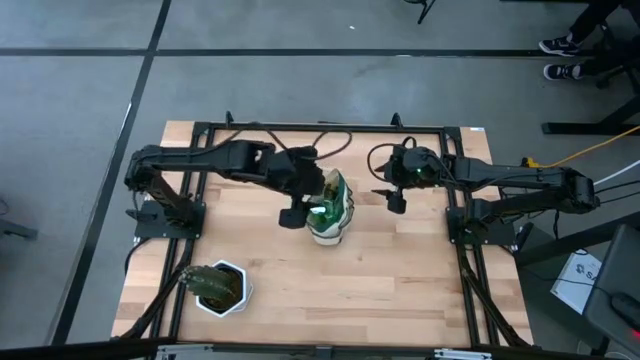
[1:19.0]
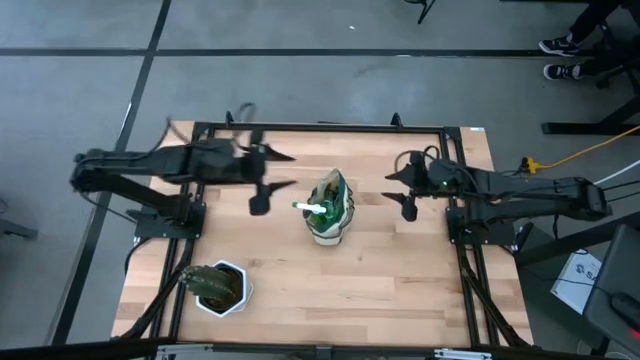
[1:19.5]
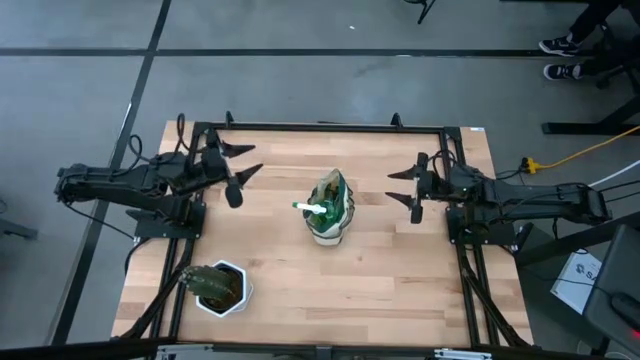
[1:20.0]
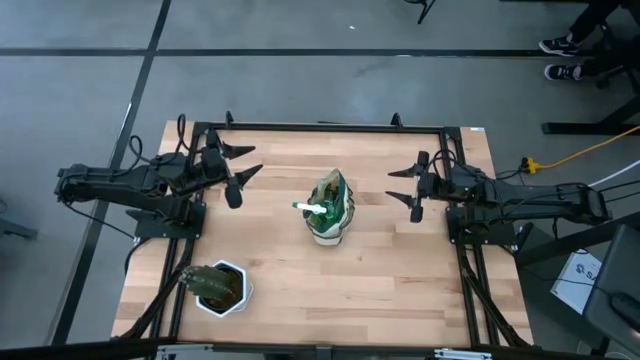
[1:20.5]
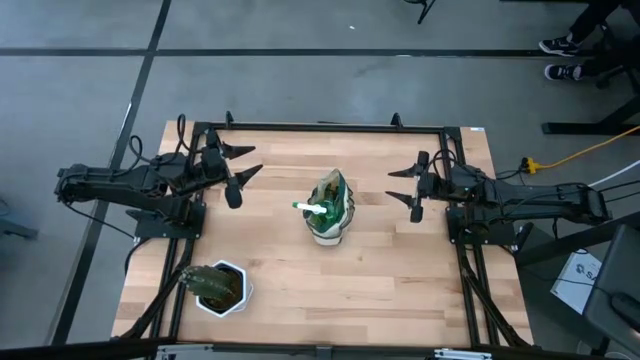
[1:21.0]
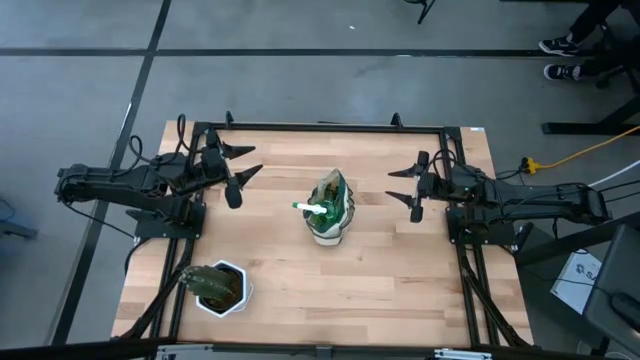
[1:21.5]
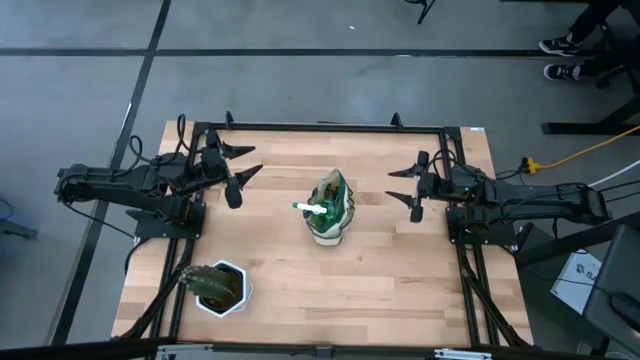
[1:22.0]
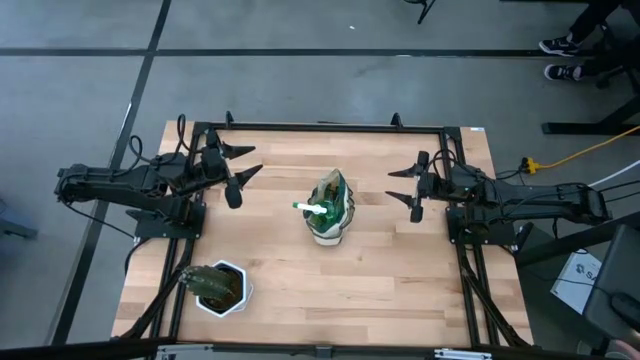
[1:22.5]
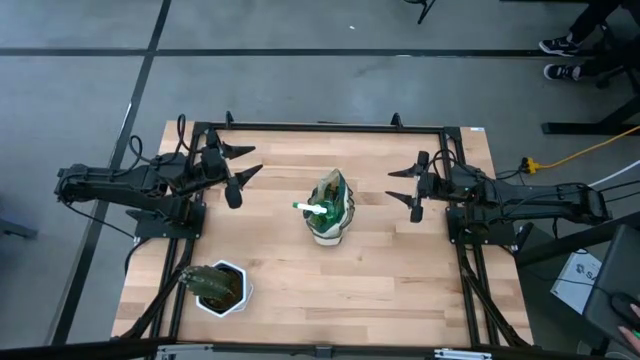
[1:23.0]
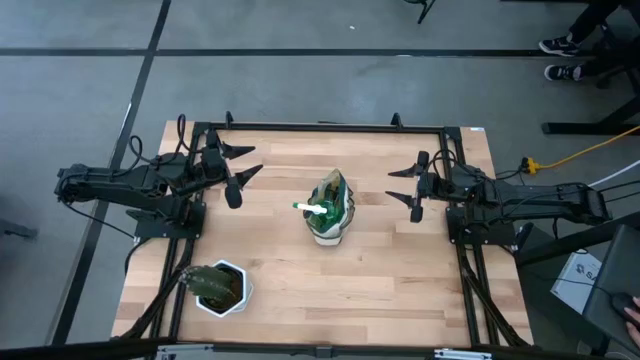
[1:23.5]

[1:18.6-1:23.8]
Task: Pick & Place Garden tools in Gardening bag
Return to Home Position

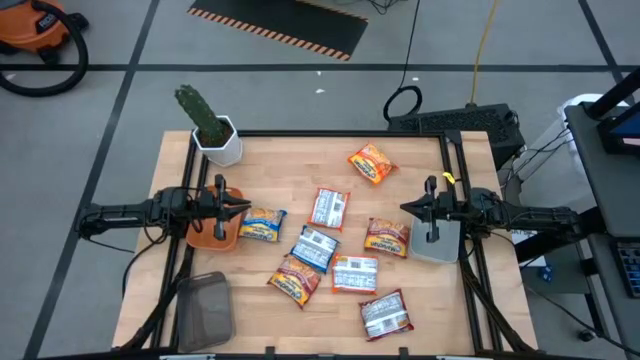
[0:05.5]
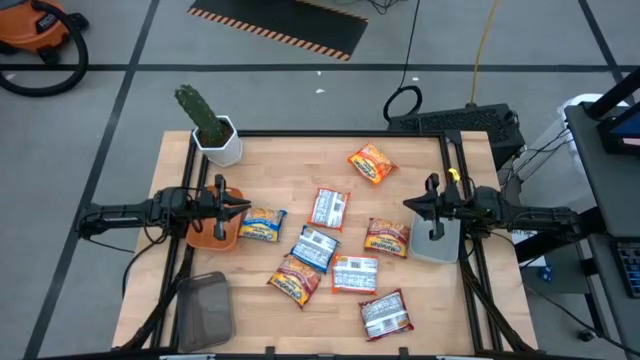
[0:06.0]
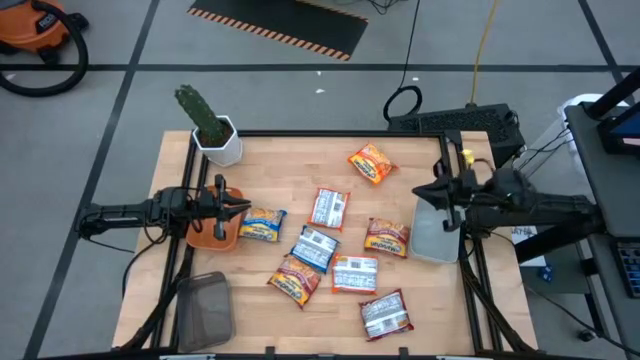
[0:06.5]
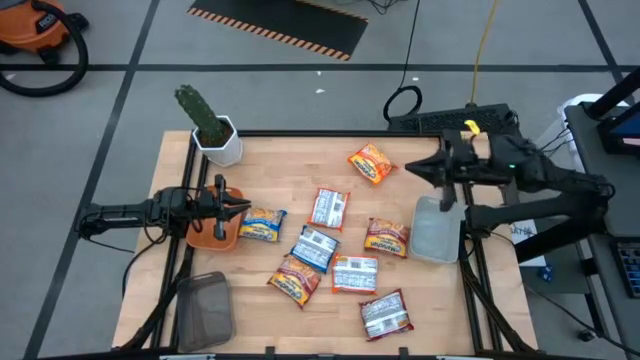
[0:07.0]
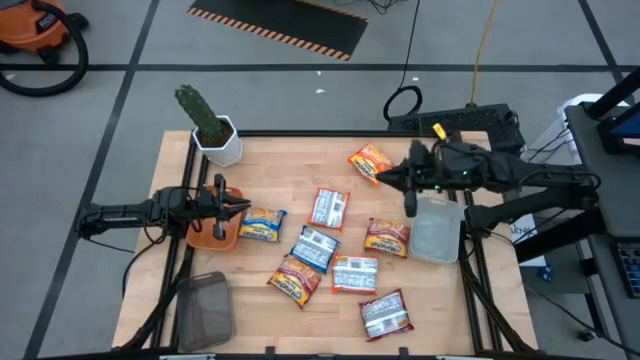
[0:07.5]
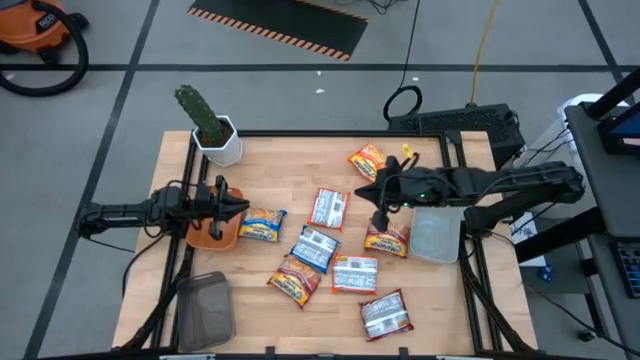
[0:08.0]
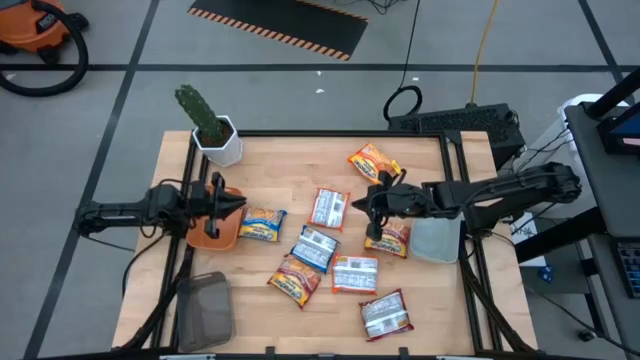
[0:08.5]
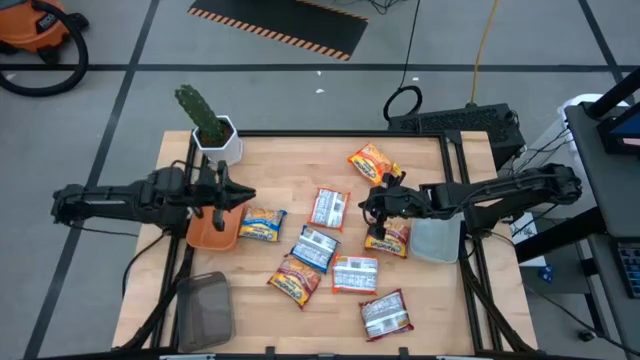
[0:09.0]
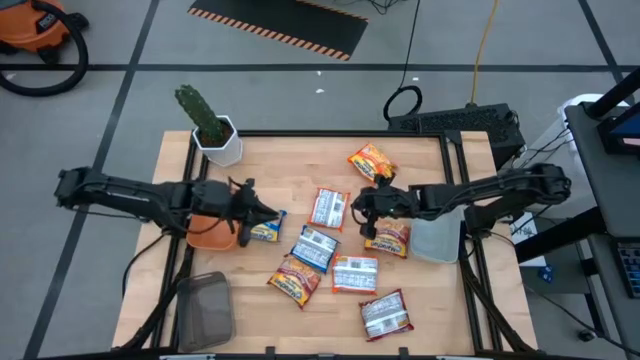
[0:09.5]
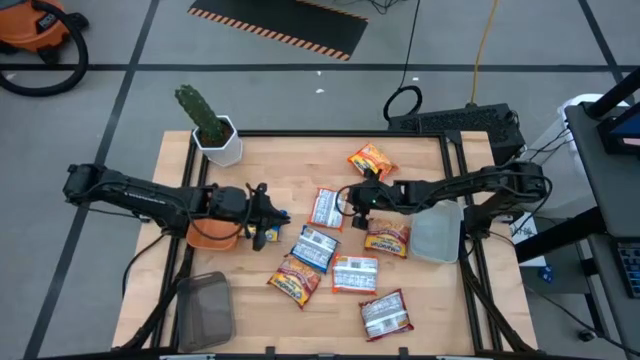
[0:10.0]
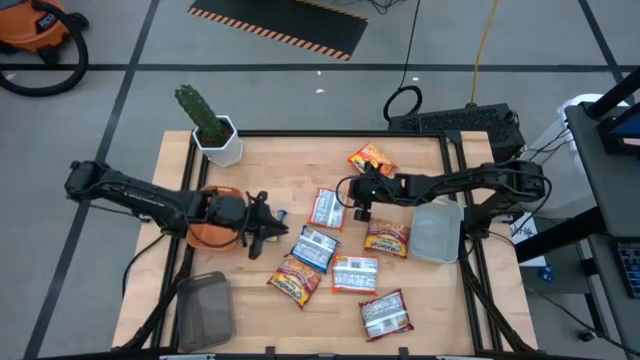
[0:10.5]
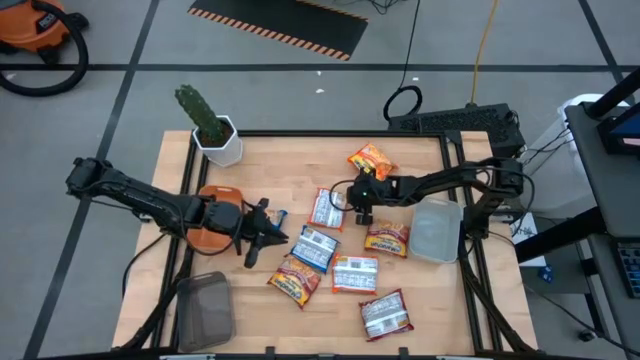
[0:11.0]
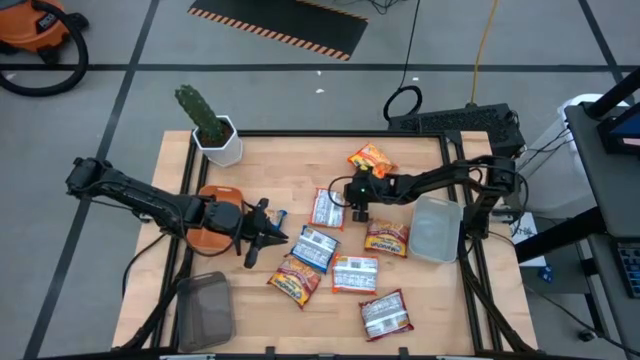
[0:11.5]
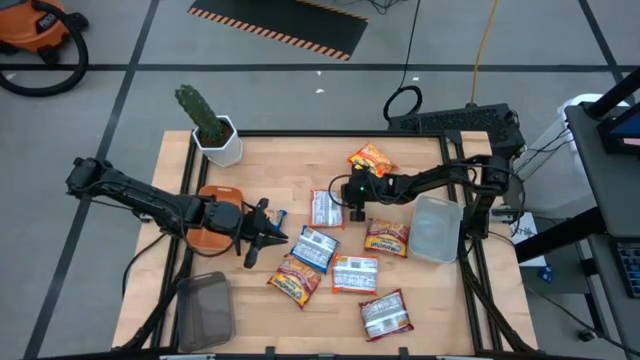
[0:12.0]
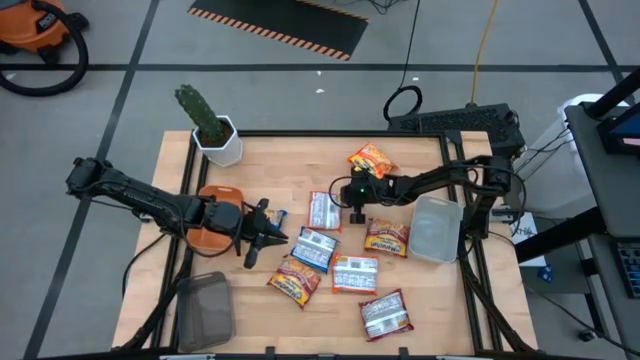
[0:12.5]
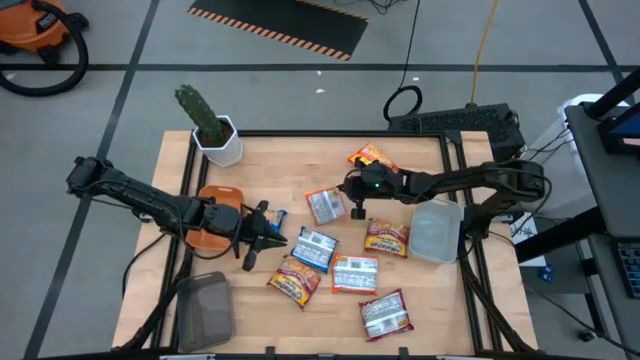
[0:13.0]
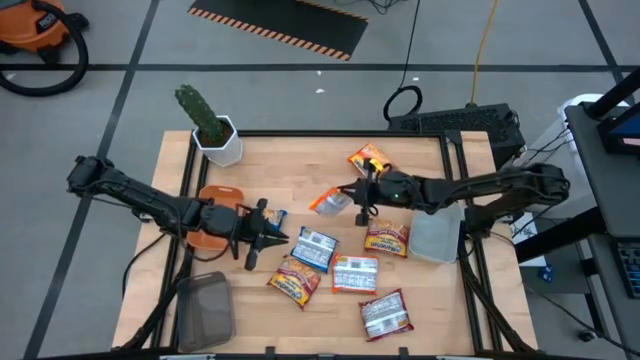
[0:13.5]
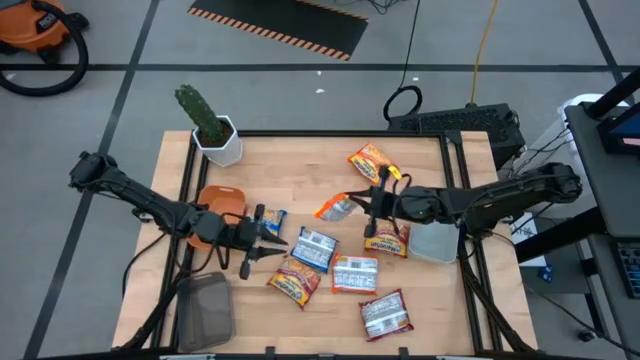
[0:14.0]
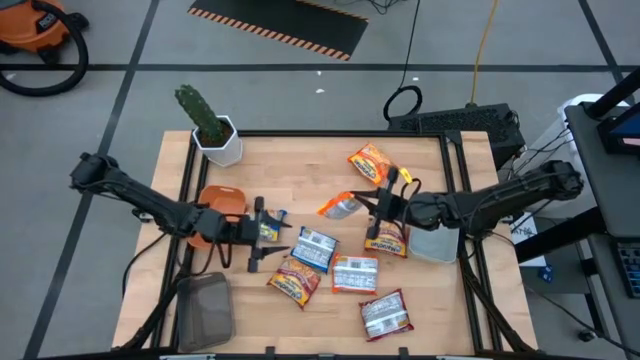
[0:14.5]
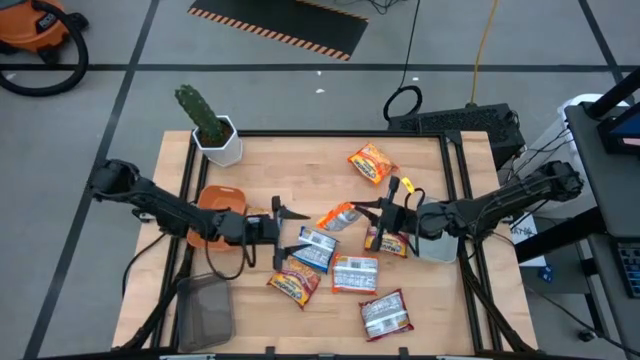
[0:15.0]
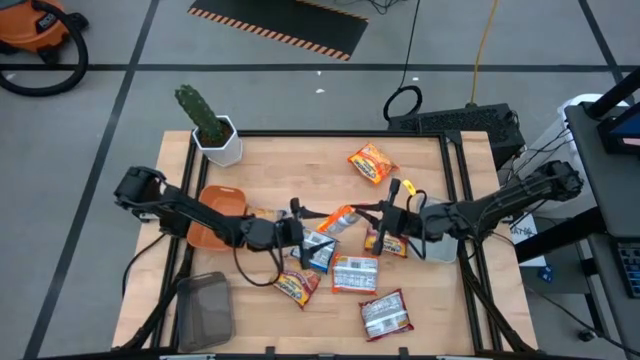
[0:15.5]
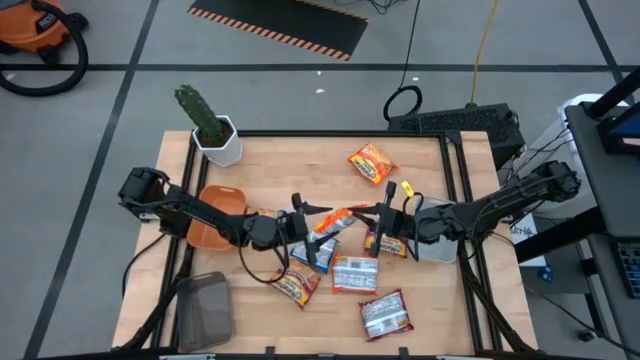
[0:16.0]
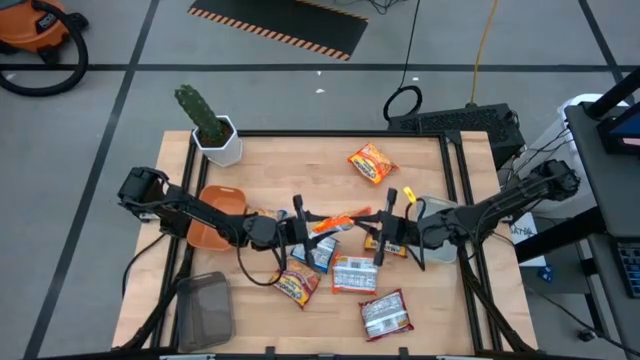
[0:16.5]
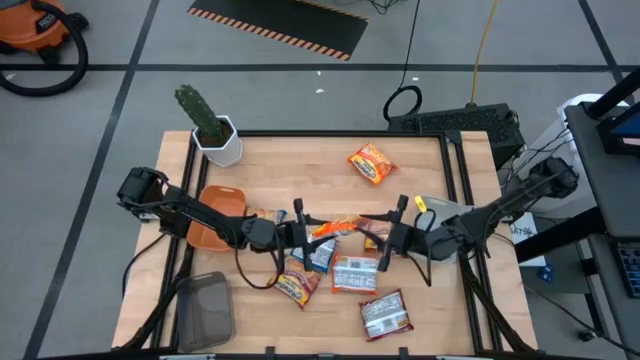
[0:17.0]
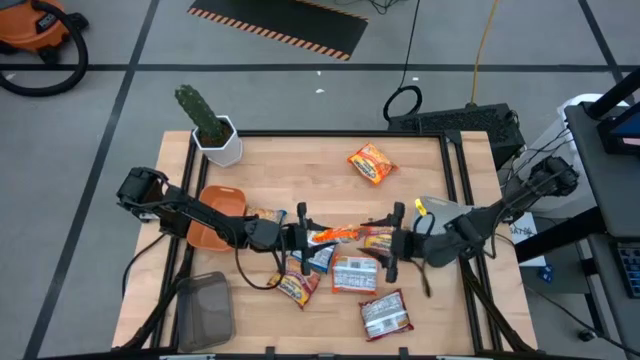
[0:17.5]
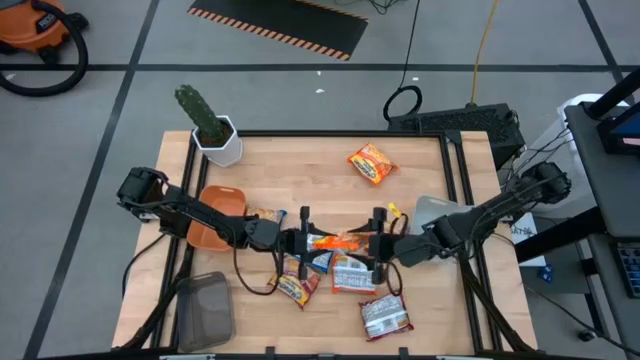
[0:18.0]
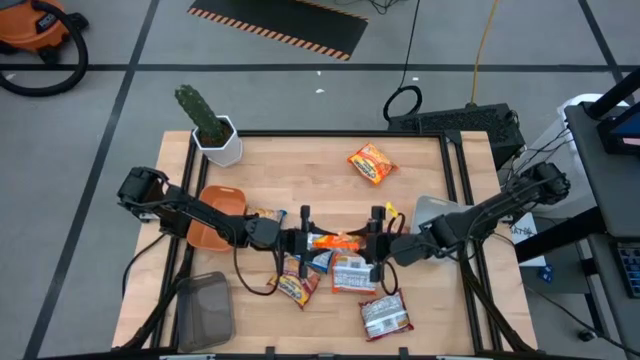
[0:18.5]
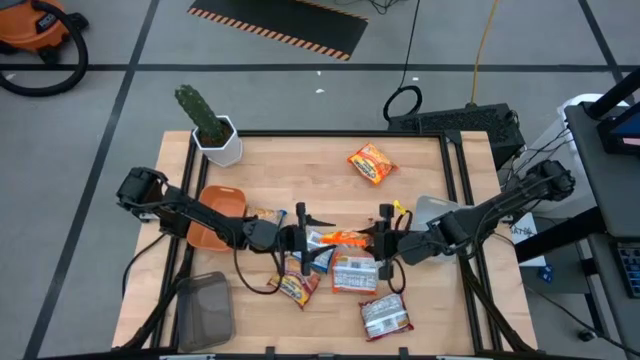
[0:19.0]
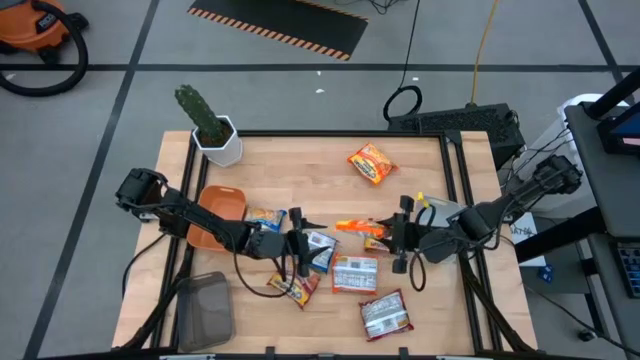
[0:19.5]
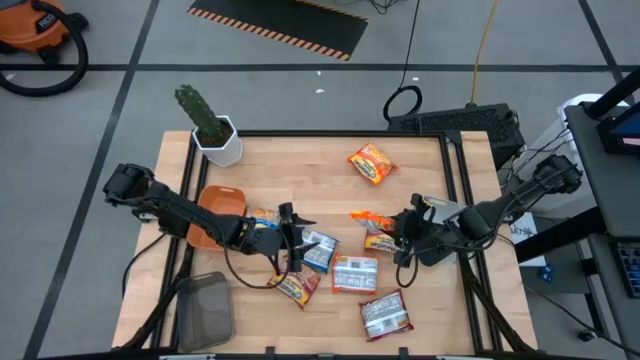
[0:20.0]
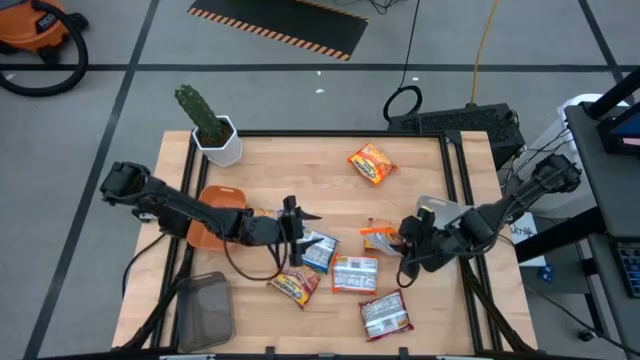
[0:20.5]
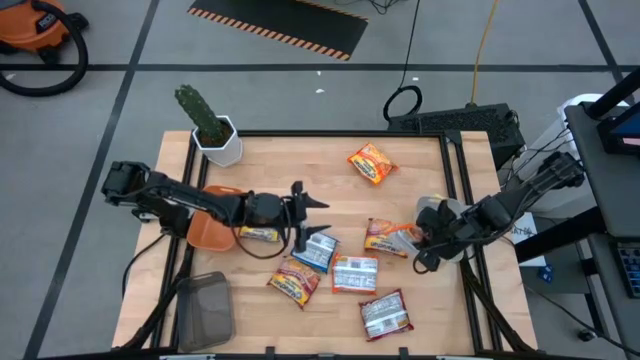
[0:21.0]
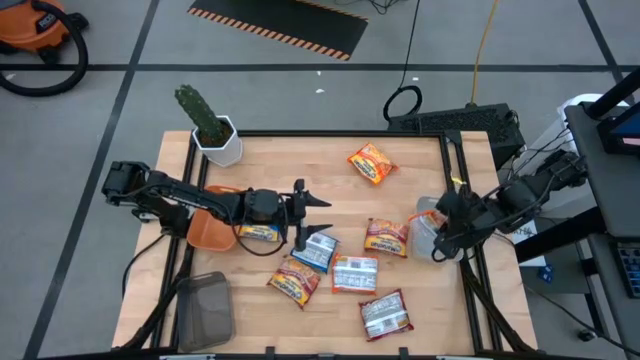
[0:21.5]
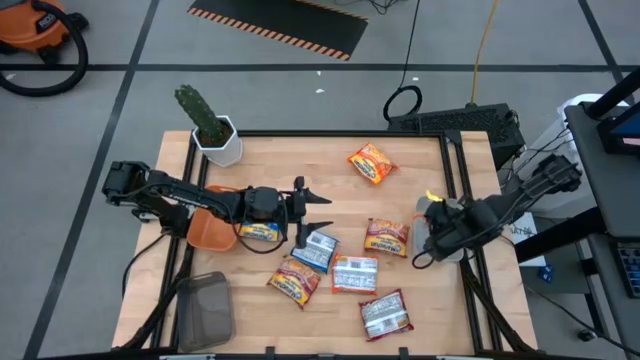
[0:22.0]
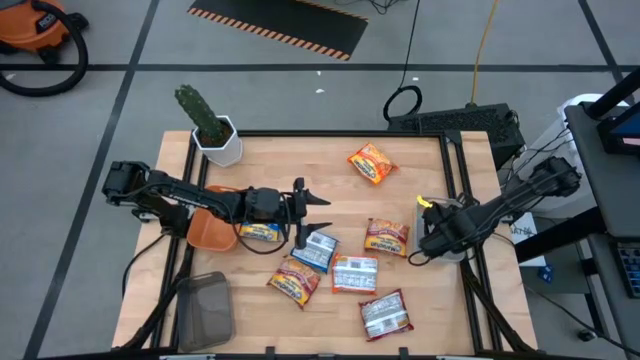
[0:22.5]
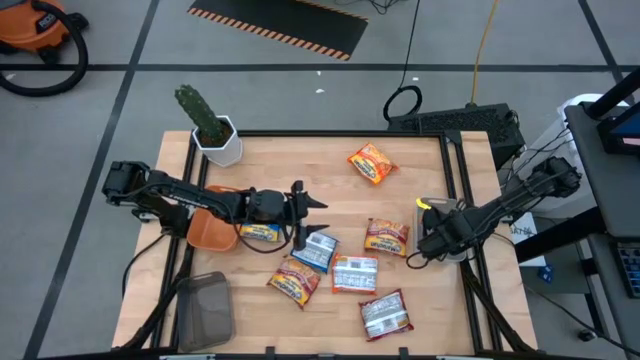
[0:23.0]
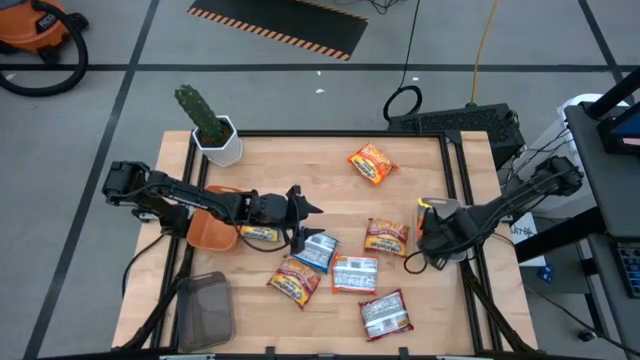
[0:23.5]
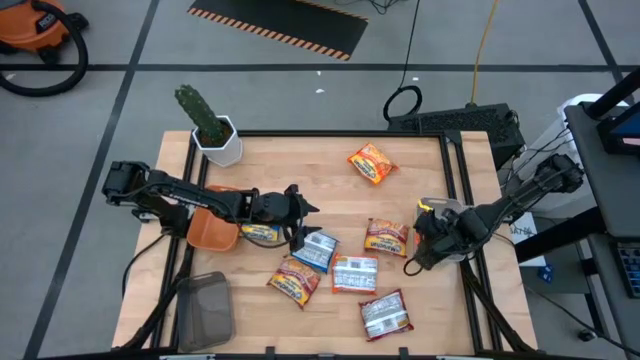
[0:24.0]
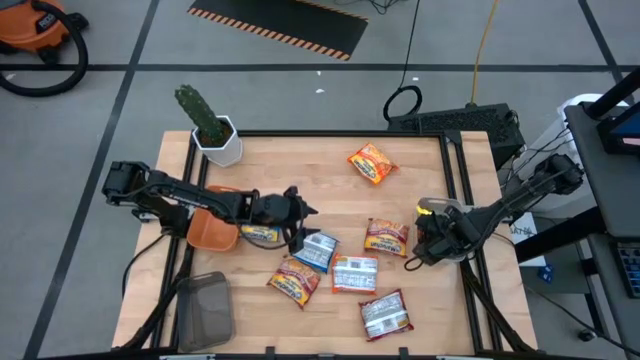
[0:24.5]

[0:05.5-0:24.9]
Task: Sort Maruchan noodles
Put the center orange noodle pack into the white bin
